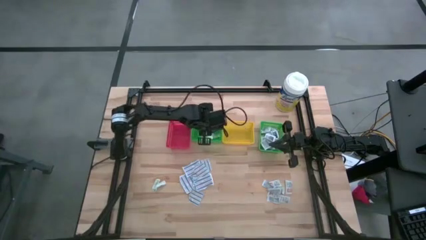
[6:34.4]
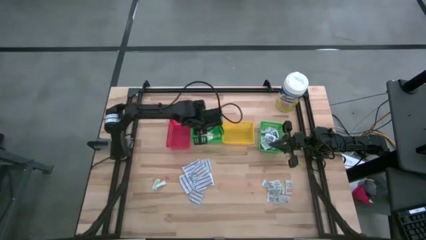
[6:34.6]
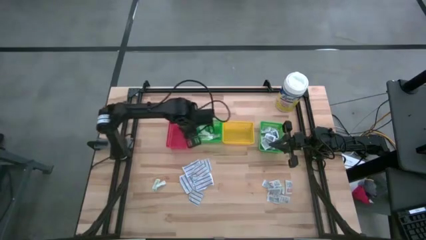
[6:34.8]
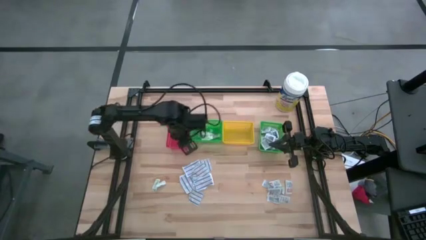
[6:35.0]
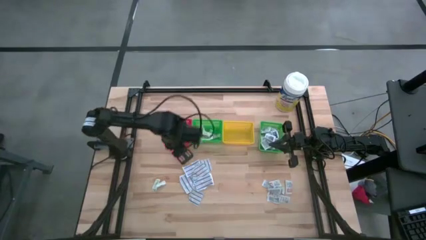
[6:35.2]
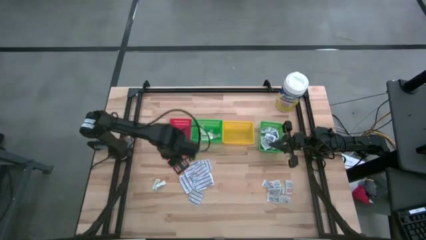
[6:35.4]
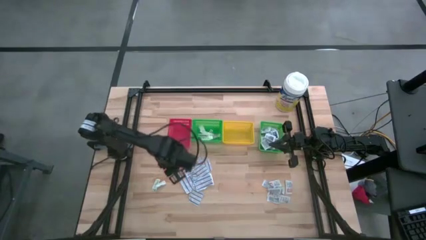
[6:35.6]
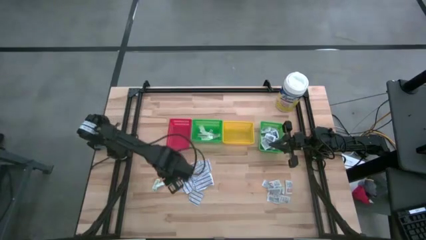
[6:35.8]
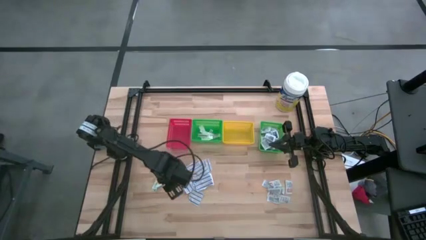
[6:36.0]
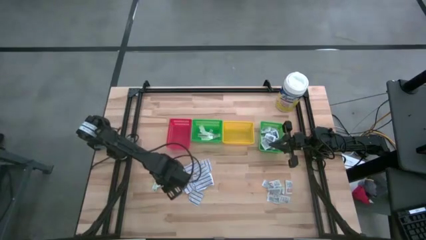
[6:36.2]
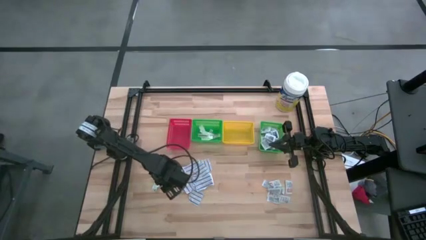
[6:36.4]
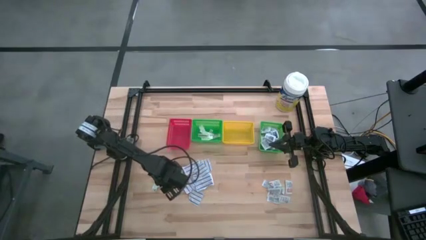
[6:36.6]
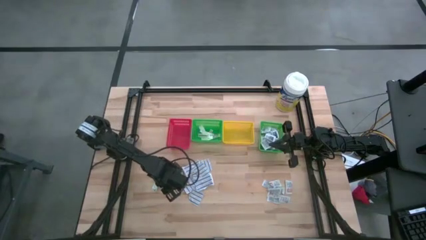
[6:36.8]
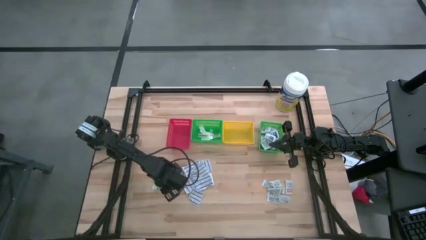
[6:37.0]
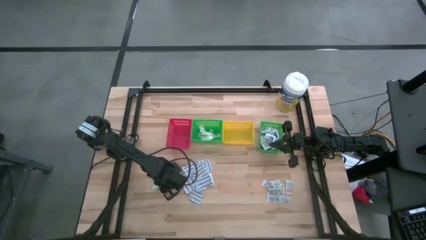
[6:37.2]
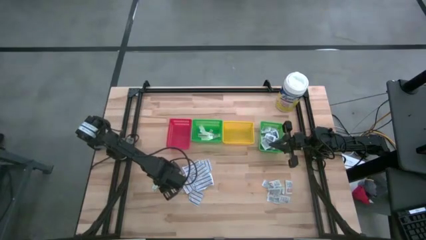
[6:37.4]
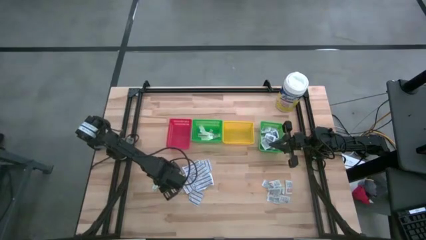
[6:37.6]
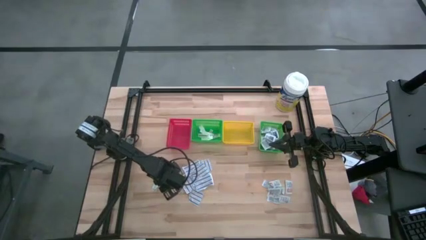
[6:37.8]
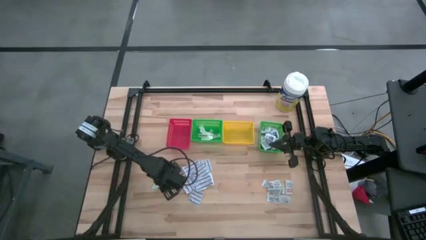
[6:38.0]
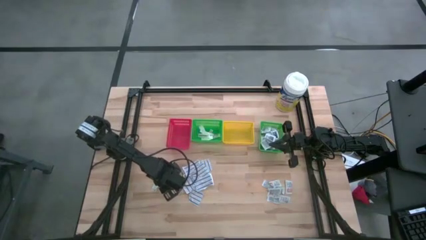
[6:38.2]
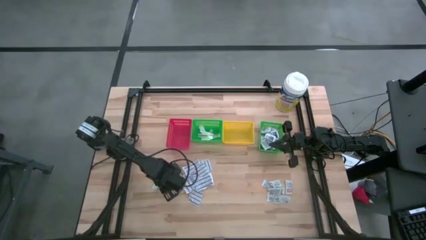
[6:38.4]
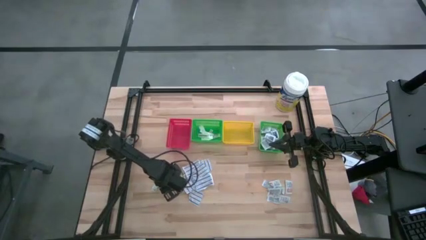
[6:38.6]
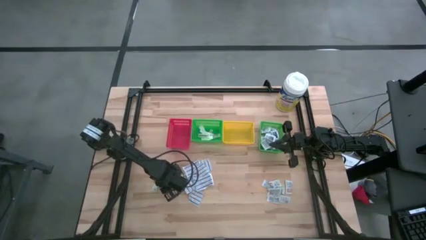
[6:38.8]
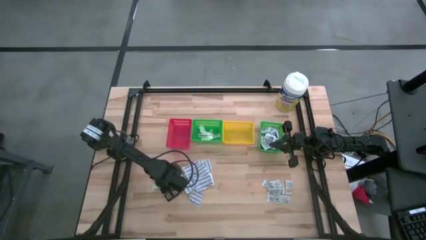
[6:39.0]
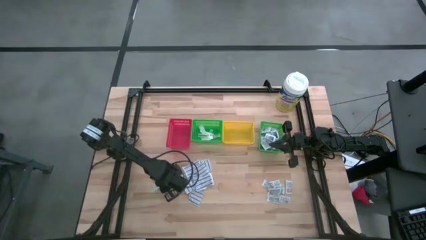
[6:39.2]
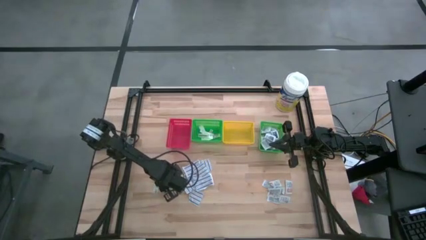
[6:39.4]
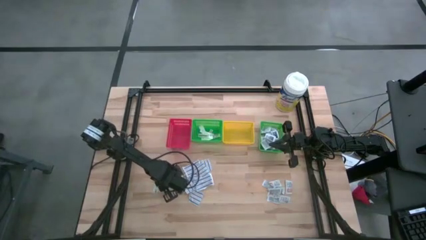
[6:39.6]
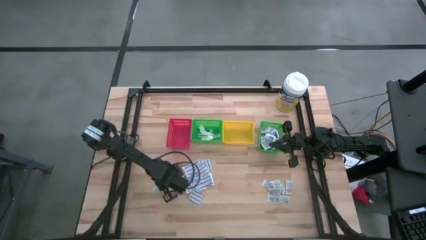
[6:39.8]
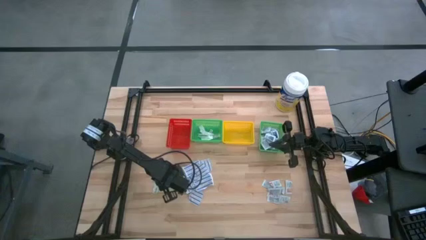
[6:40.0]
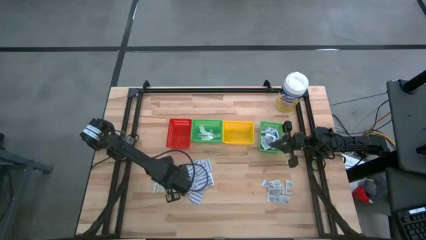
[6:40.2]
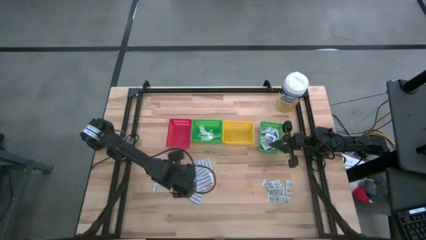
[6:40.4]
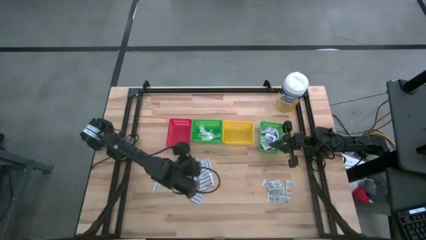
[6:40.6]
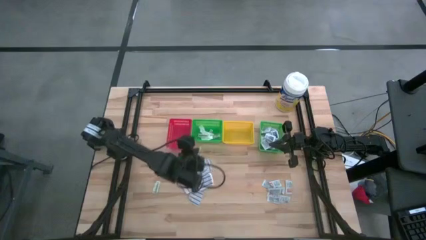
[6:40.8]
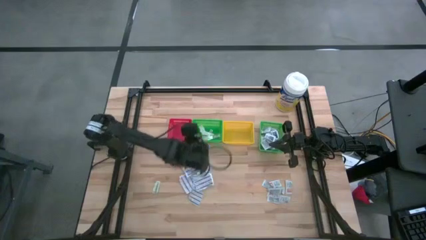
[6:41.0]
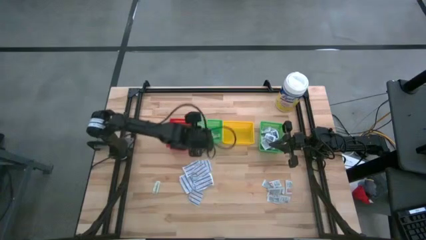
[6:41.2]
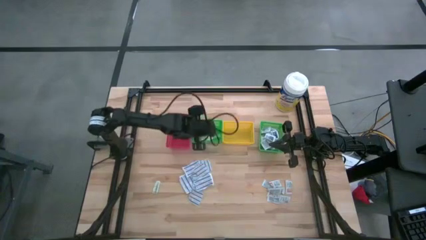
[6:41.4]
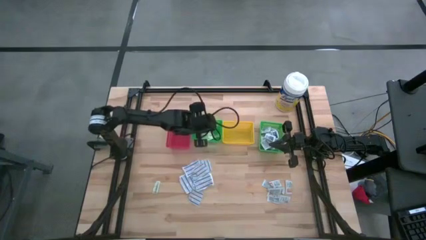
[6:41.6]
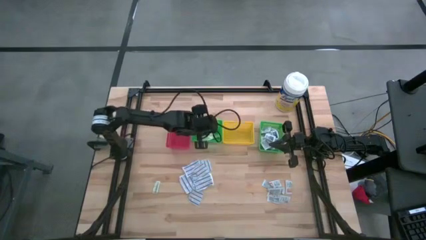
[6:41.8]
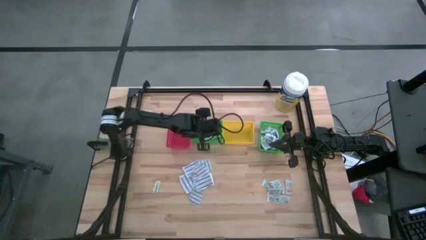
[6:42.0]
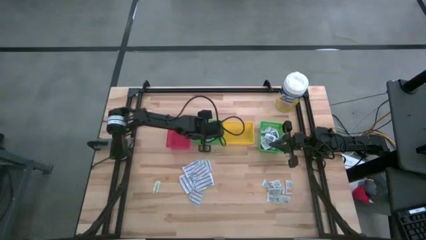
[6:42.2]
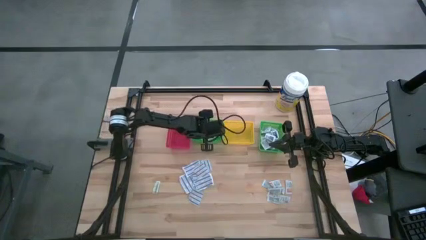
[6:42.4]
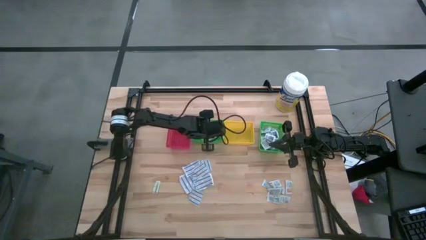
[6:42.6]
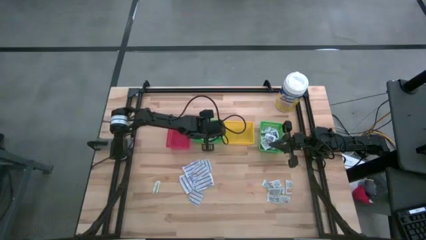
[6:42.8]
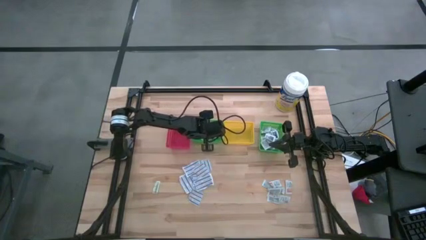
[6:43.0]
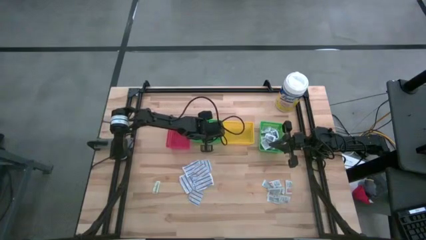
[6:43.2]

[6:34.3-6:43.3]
Task: Pick & Place First Aid Supplies
Put the green bandage into the left green bin

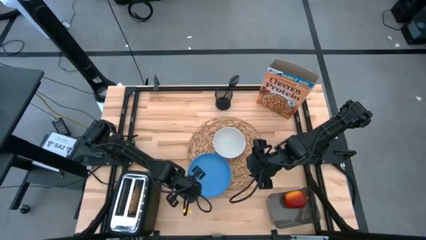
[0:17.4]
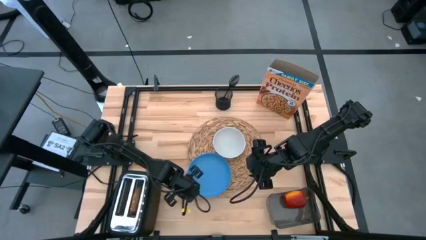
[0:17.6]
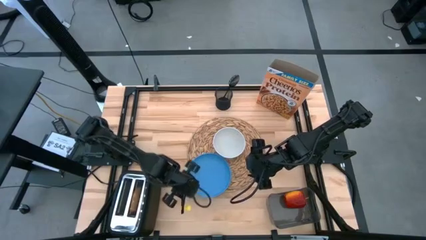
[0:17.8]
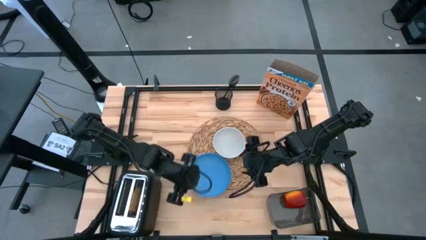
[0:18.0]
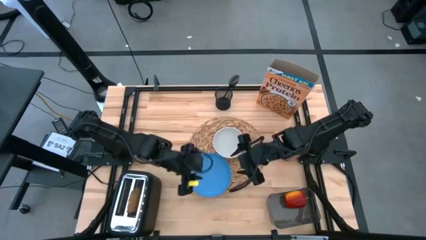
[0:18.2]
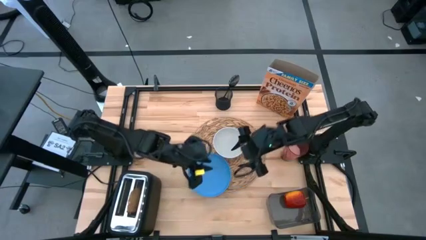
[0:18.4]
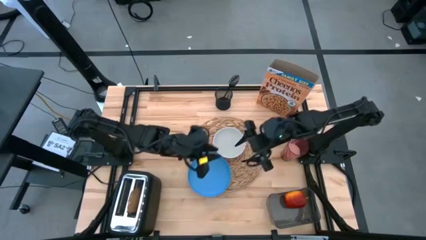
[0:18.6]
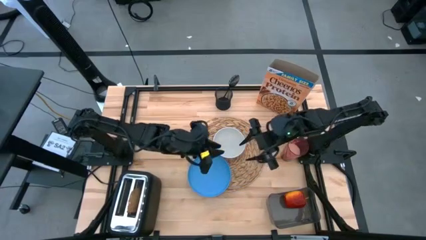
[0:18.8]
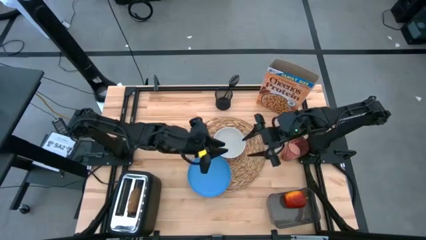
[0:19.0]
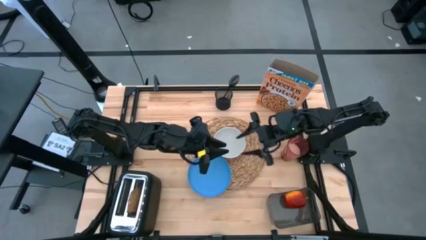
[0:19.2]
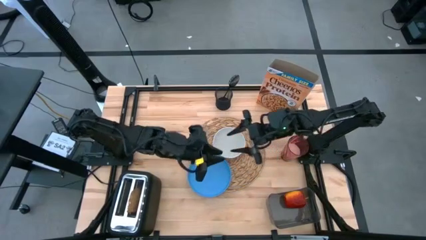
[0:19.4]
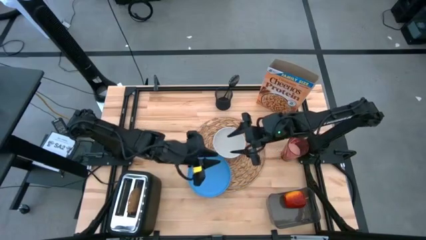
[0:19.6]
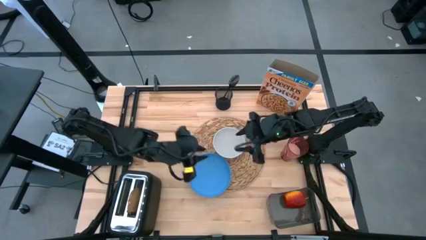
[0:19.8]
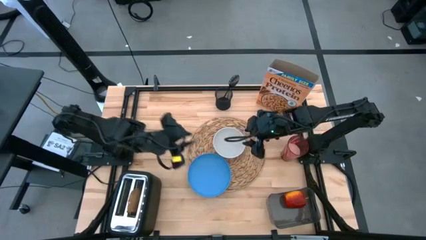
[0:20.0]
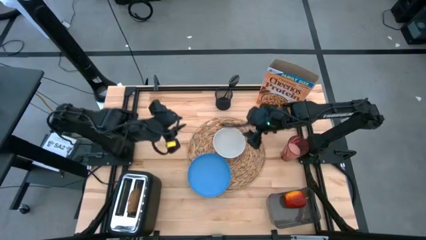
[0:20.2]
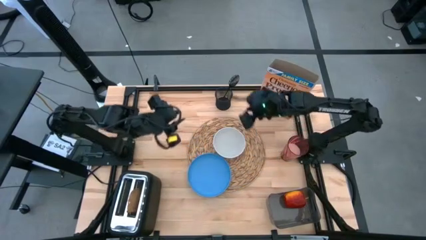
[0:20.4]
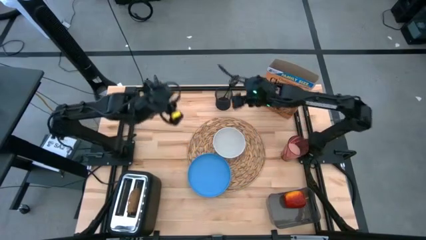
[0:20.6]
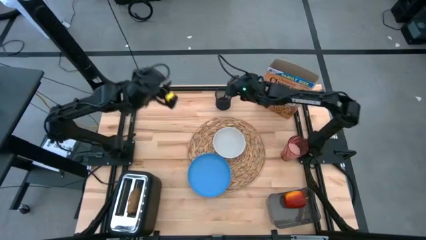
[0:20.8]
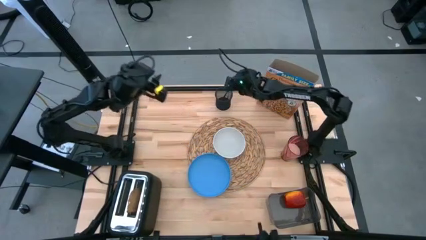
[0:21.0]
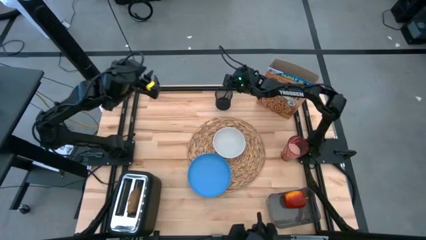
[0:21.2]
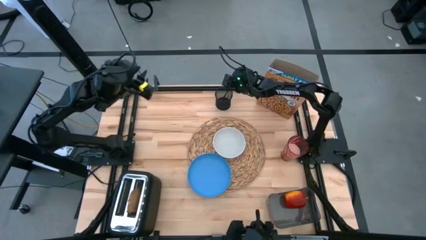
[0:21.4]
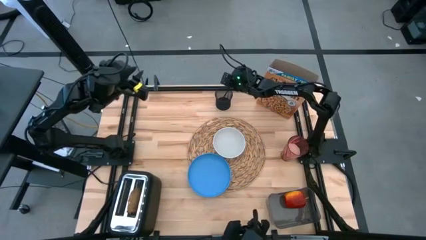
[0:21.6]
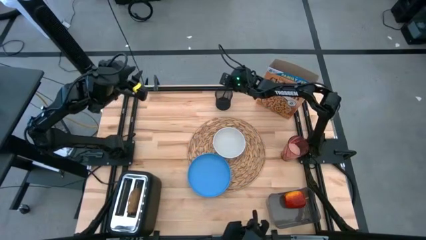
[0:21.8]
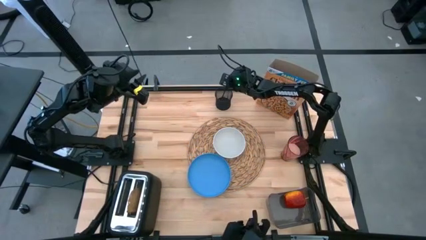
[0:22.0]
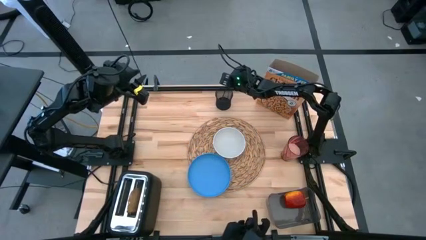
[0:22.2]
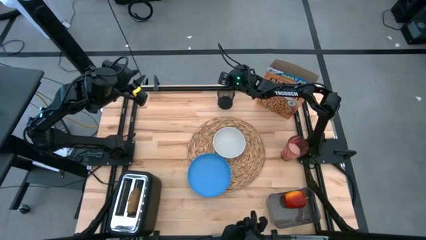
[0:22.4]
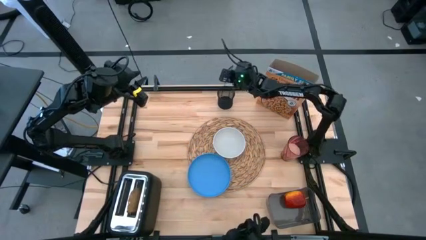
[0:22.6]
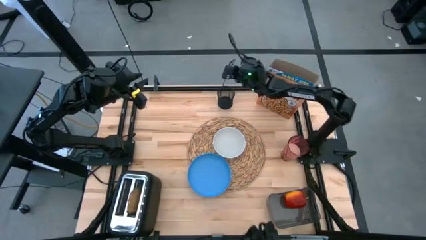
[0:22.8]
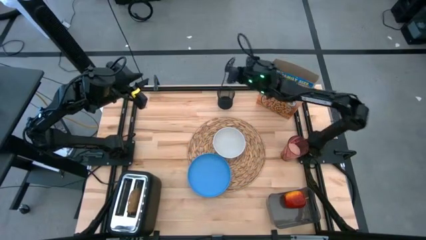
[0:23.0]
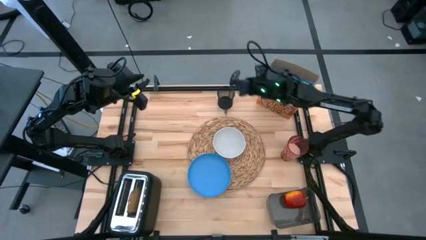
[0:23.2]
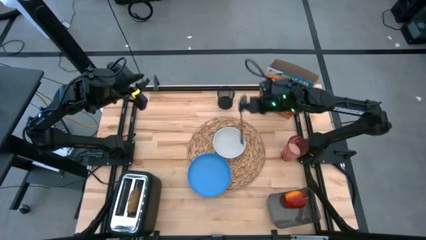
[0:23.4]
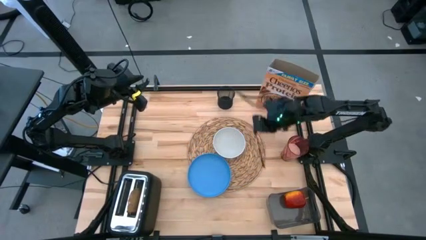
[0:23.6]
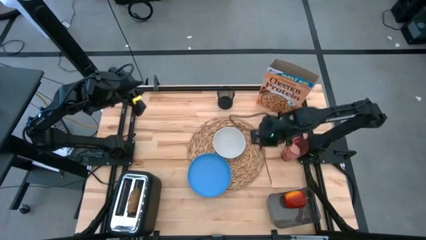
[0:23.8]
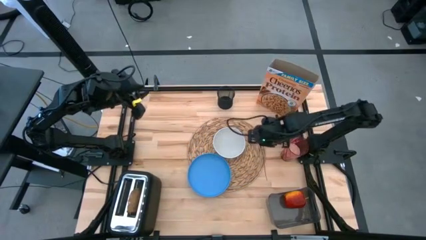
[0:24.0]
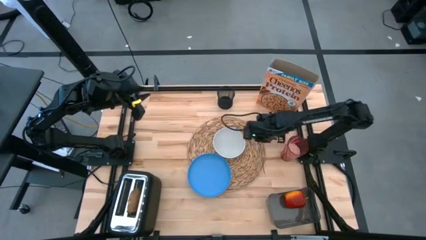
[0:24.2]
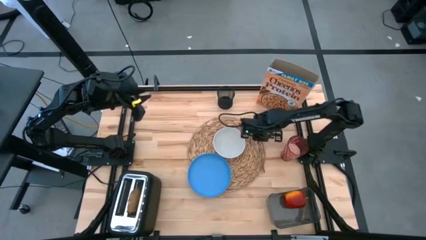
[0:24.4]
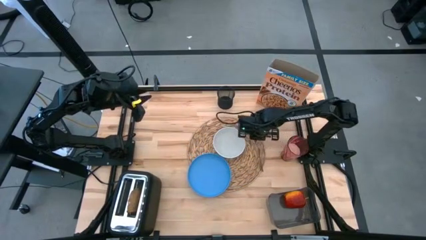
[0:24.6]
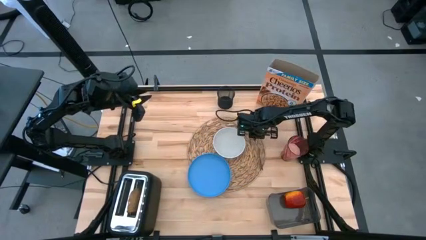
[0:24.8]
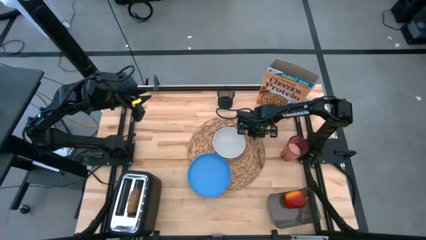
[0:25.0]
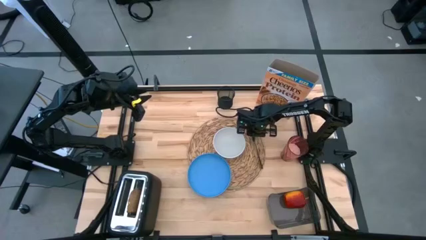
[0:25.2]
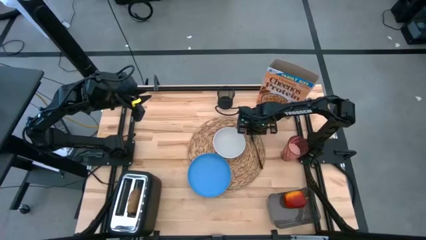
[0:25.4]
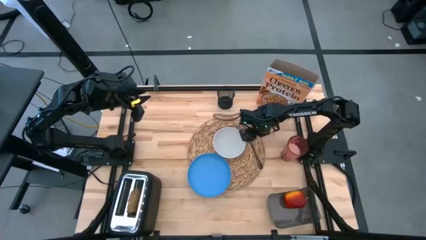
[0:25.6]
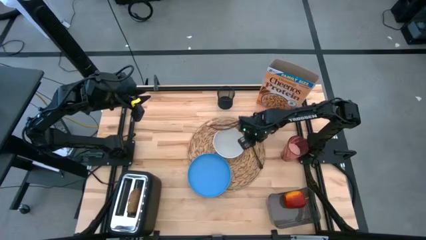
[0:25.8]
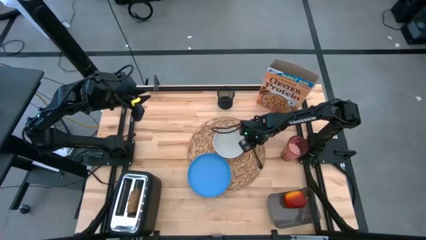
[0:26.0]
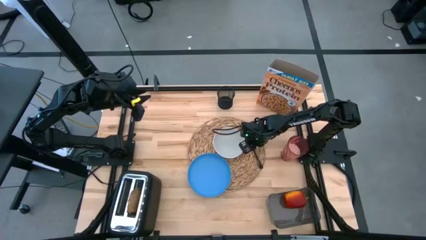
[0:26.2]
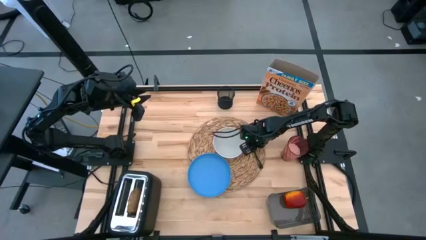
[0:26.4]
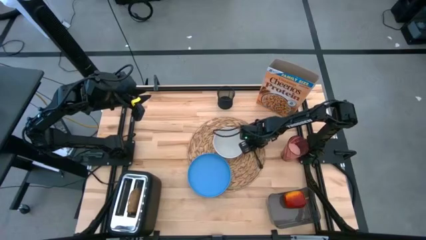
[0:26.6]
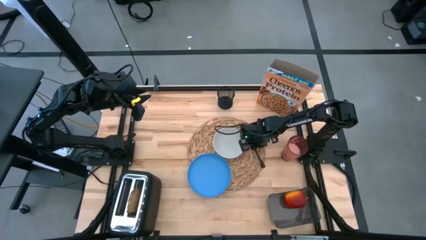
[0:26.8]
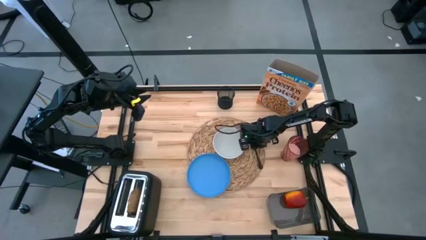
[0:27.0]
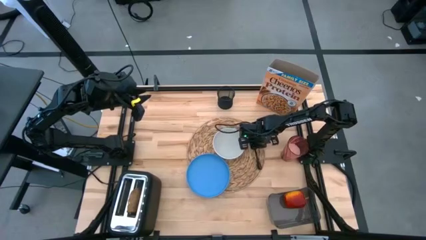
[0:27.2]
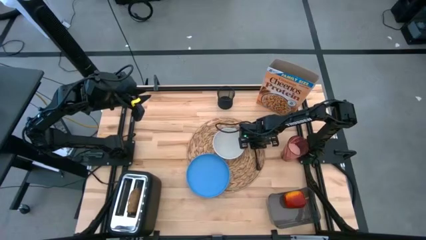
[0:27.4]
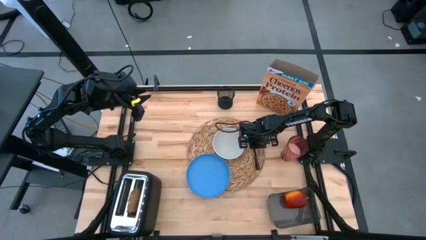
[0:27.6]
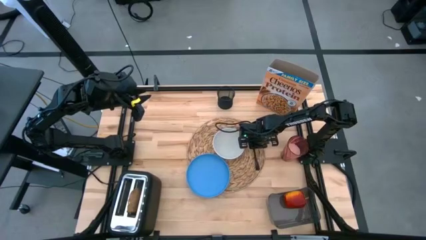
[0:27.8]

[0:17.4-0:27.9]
Task: Arrange a breakfast setting
Put the black spoon on the brown placemat to the right of the white bowl
